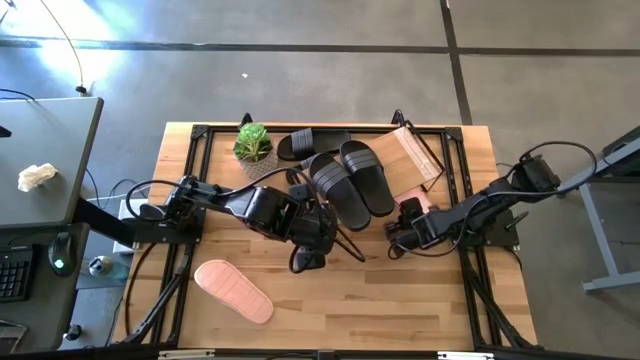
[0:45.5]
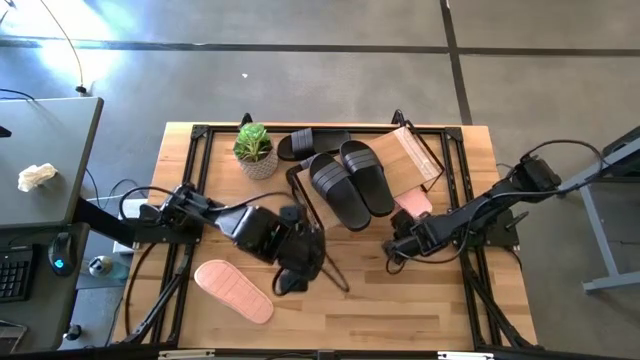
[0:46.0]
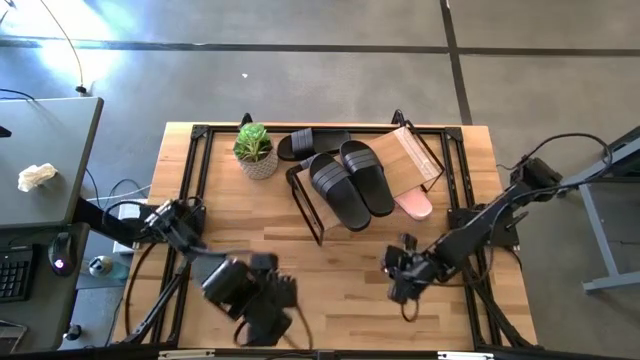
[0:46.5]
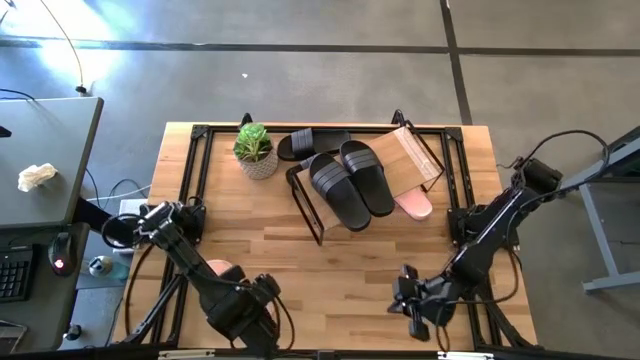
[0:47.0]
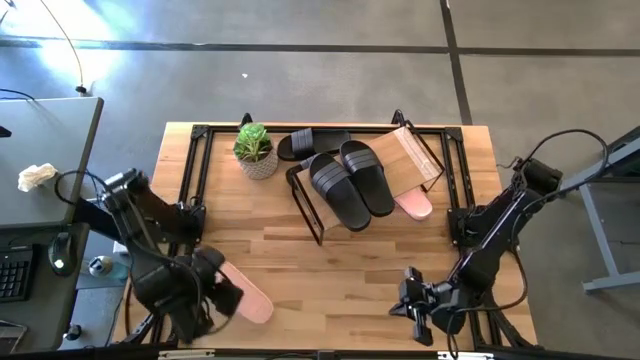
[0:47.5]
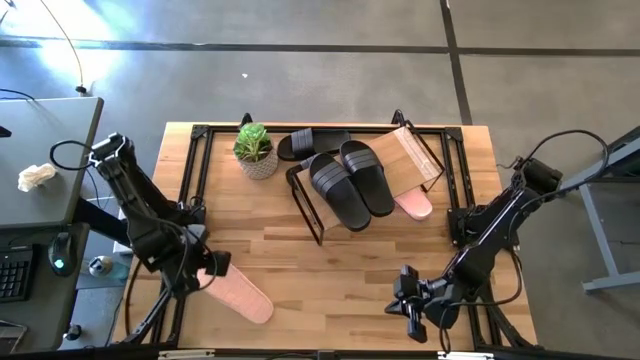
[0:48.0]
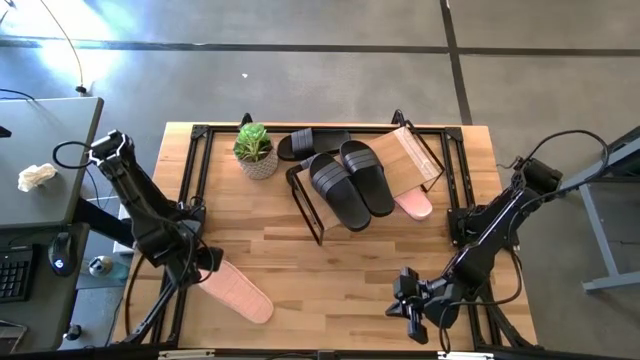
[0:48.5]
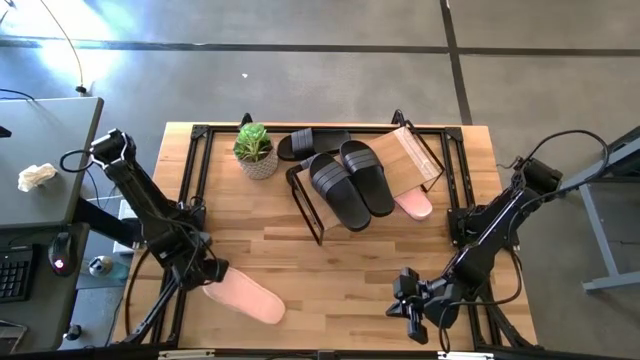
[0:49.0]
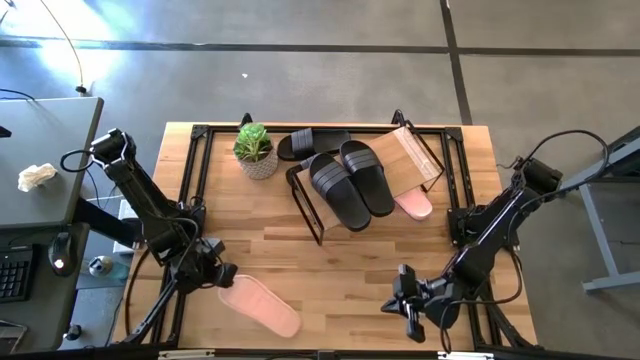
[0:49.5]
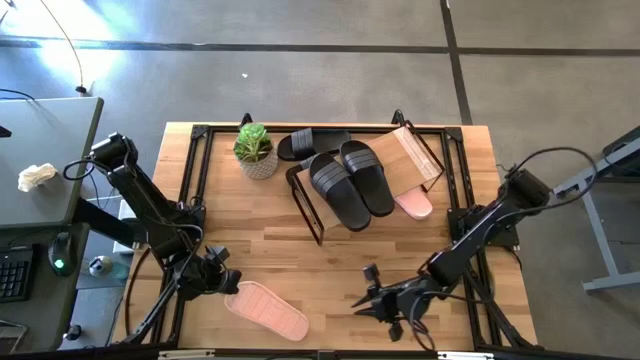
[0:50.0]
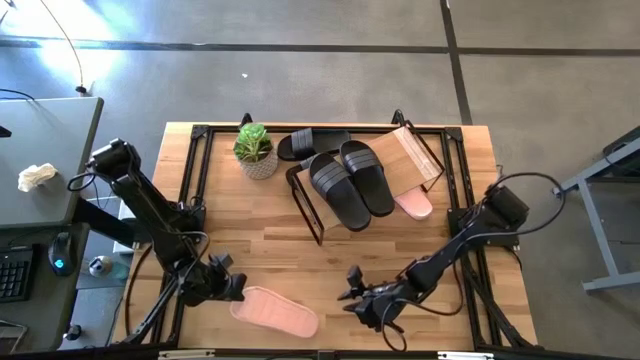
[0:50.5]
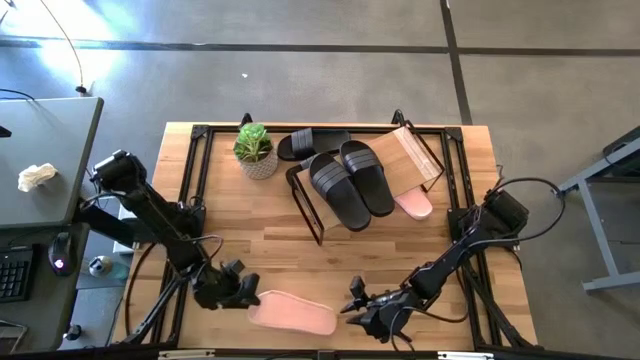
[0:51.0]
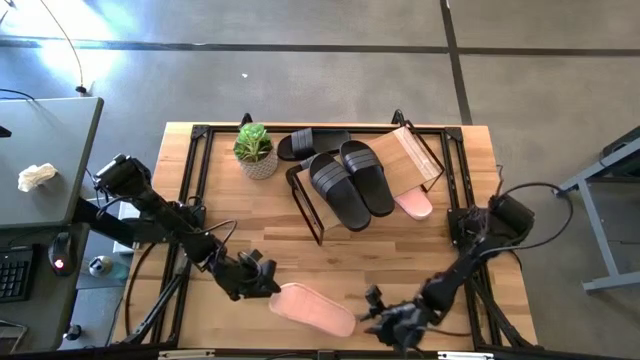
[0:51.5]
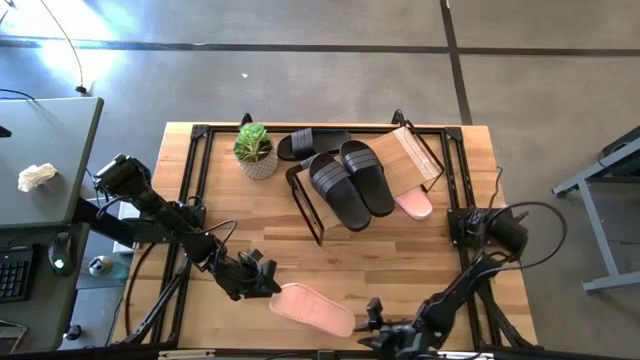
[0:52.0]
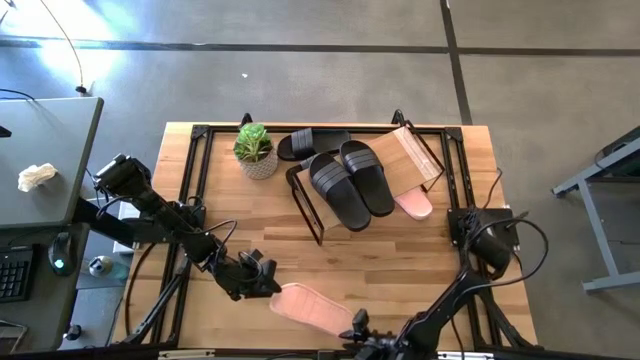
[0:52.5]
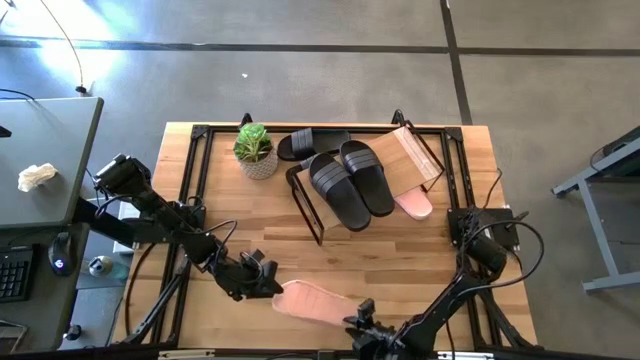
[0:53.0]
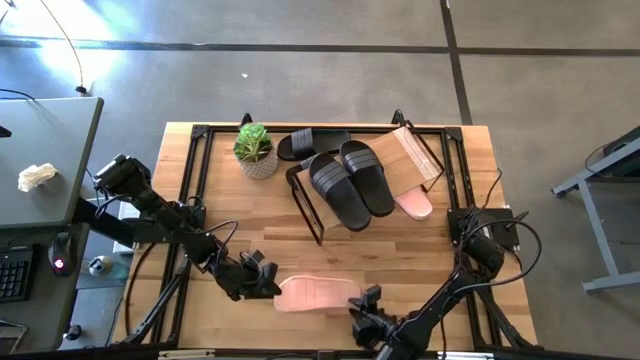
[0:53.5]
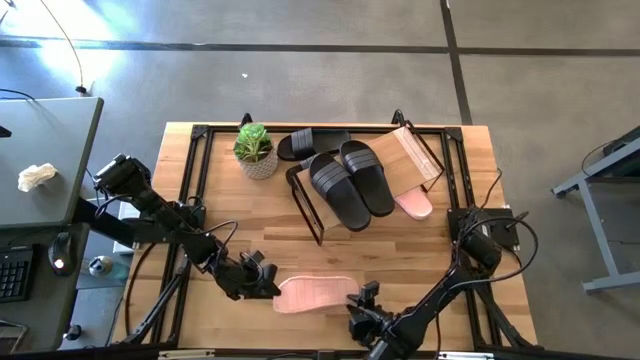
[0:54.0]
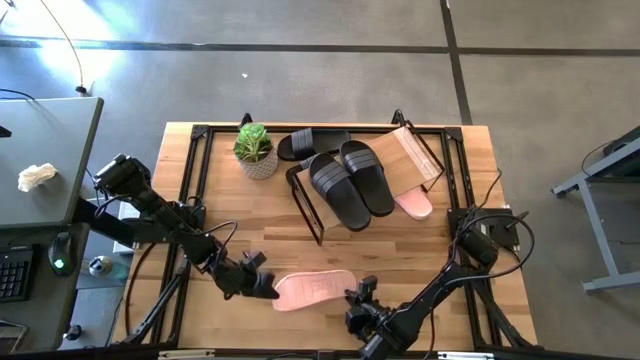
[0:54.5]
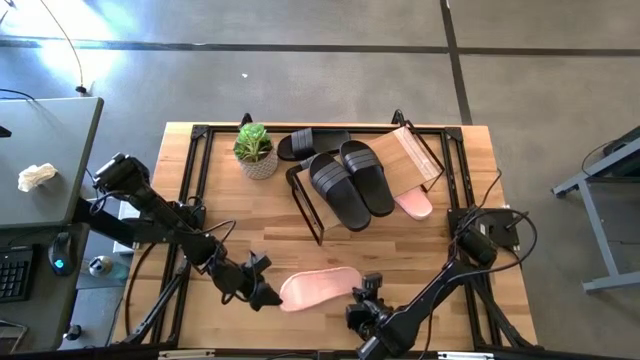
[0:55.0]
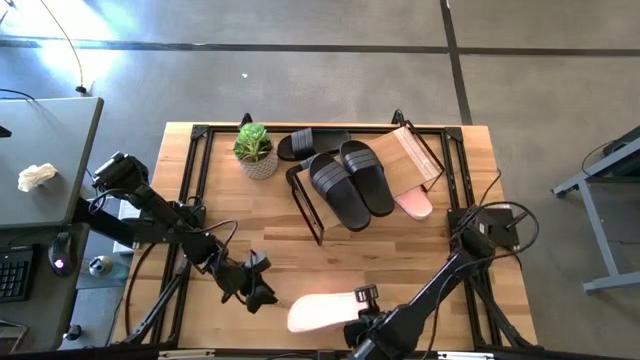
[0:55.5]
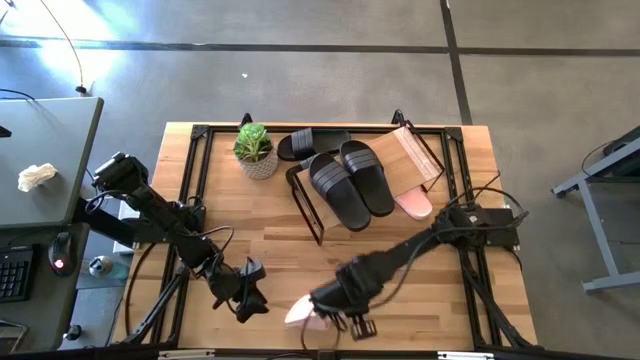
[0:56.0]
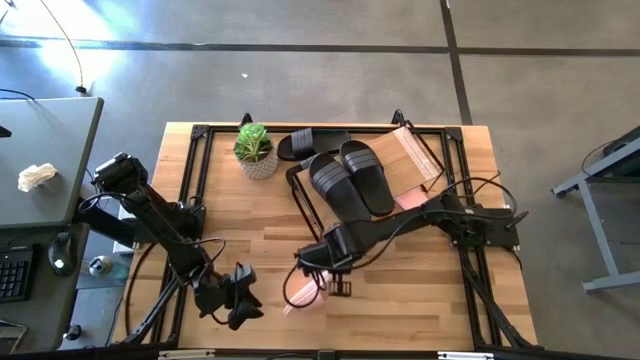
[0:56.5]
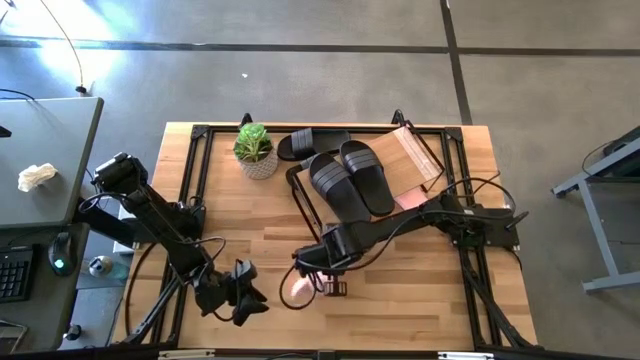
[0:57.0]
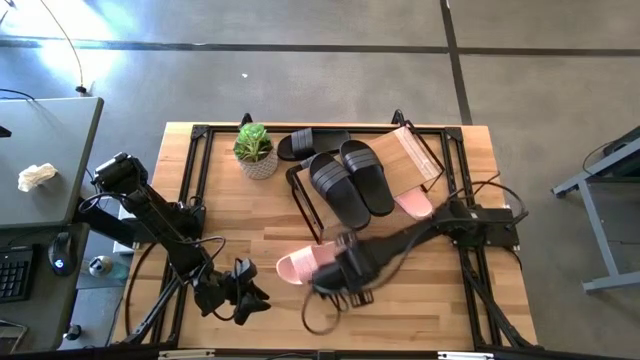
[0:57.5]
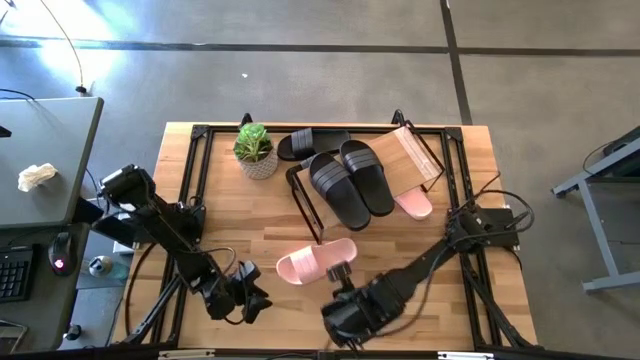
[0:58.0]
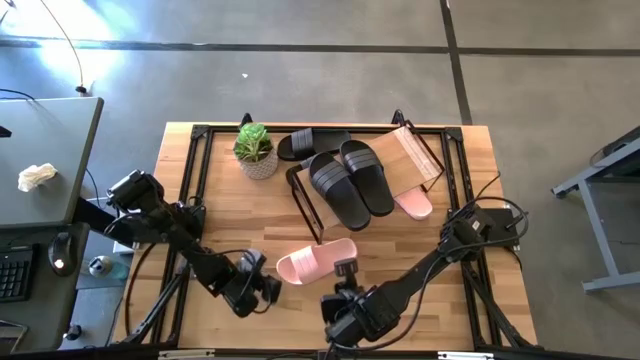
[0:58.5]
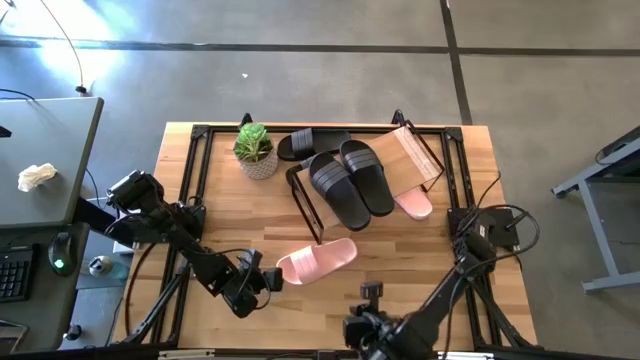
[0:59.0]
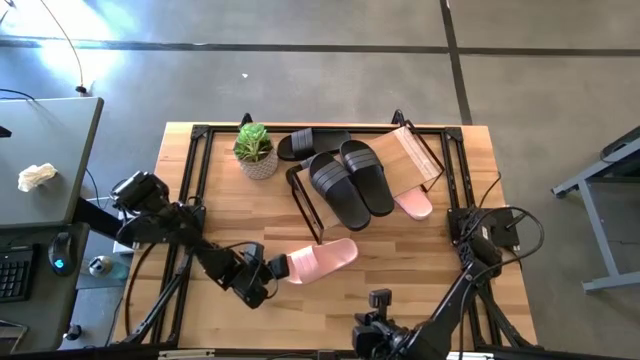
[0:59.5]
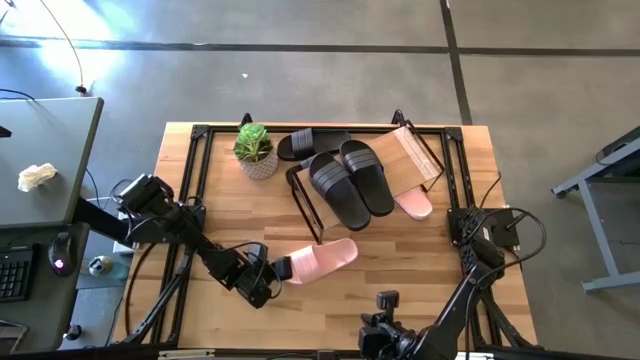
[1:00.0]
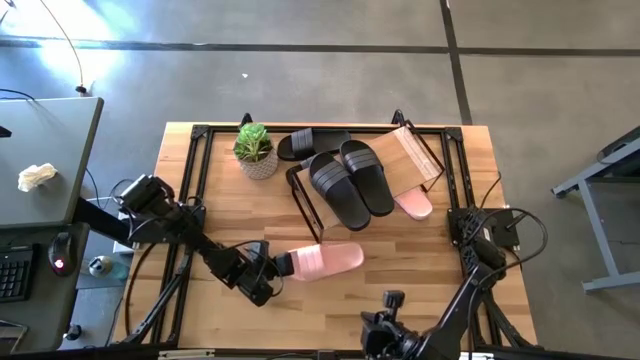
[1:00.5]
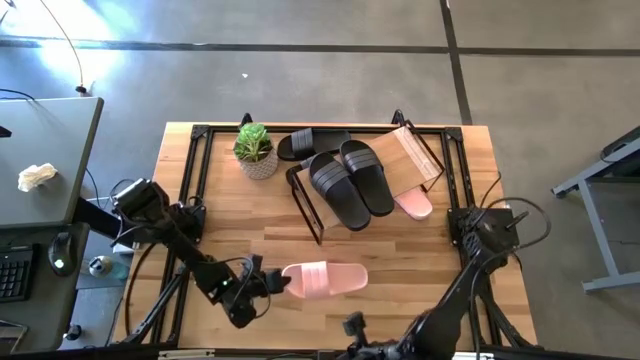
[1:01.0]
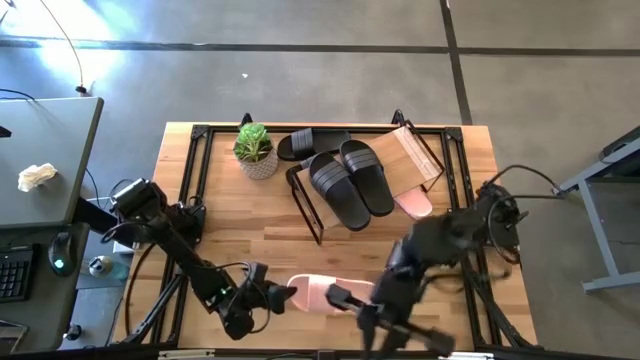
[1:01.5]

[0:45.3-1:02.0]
Task: Pick and place slides into the shelf
Put the pink slipper under the shelf

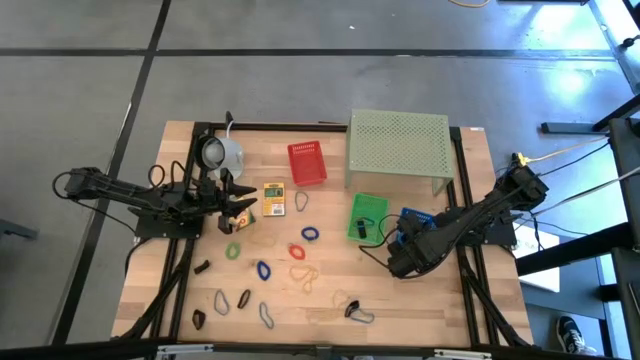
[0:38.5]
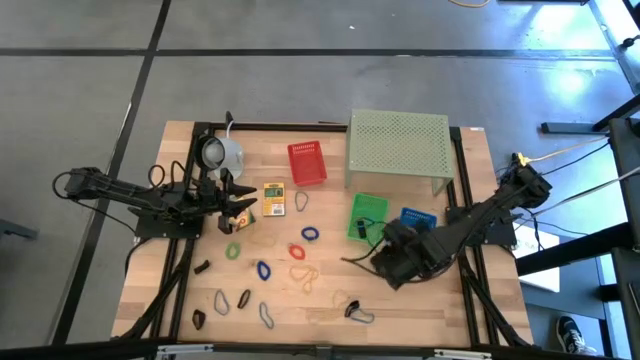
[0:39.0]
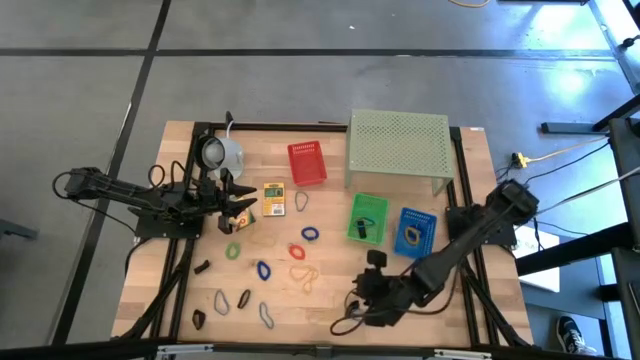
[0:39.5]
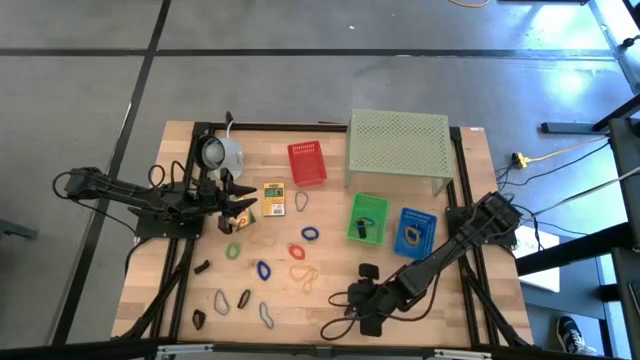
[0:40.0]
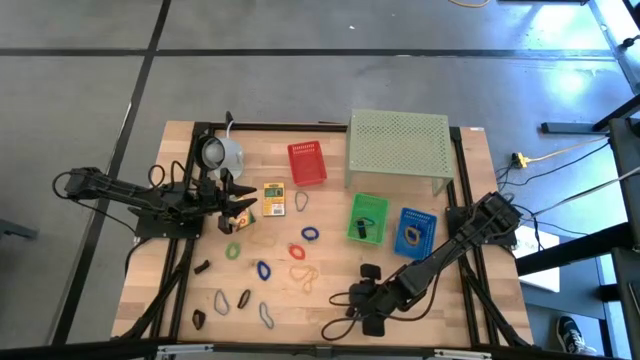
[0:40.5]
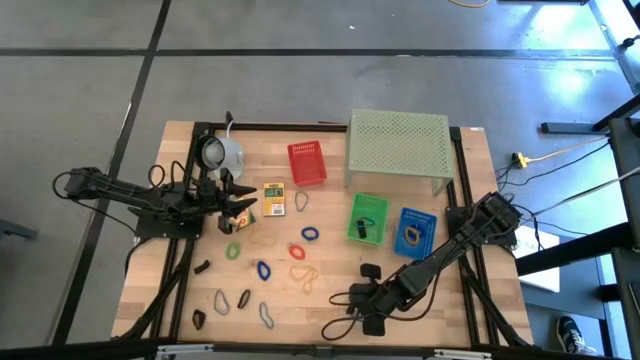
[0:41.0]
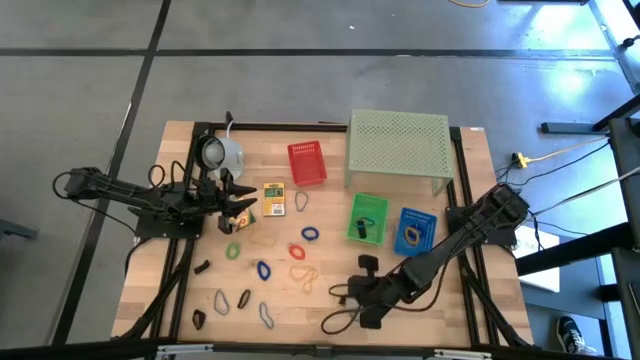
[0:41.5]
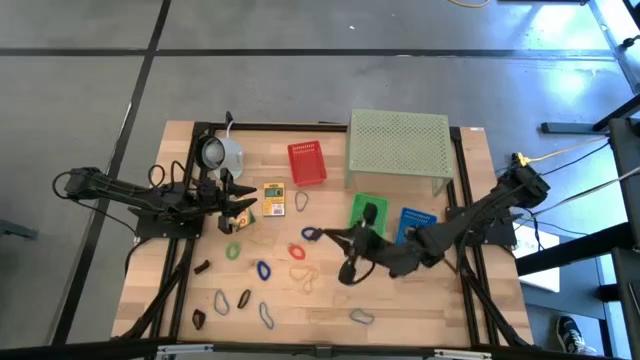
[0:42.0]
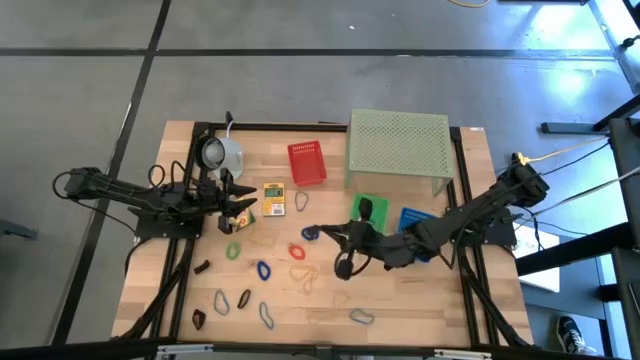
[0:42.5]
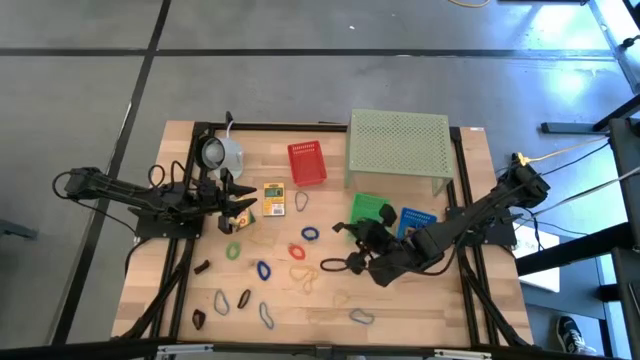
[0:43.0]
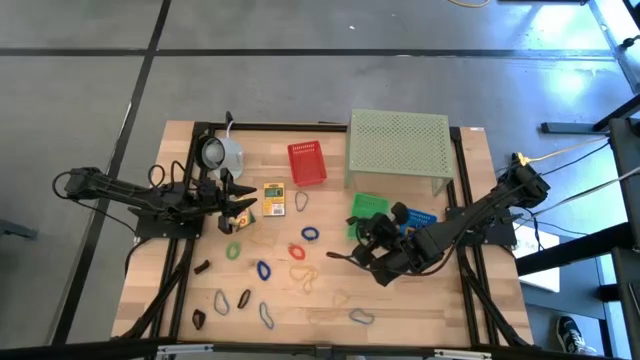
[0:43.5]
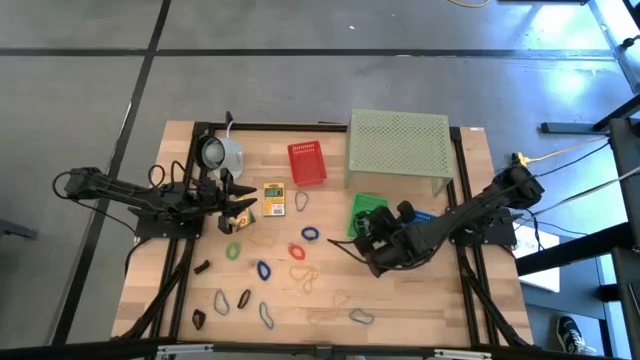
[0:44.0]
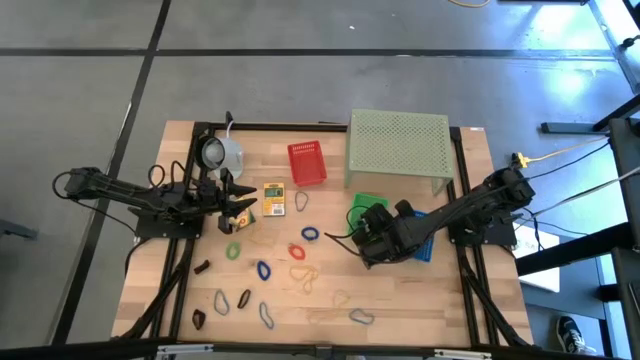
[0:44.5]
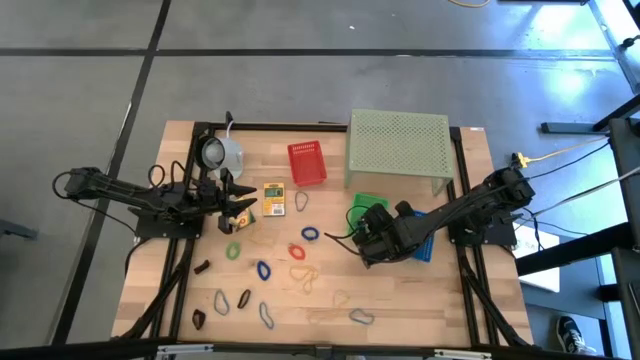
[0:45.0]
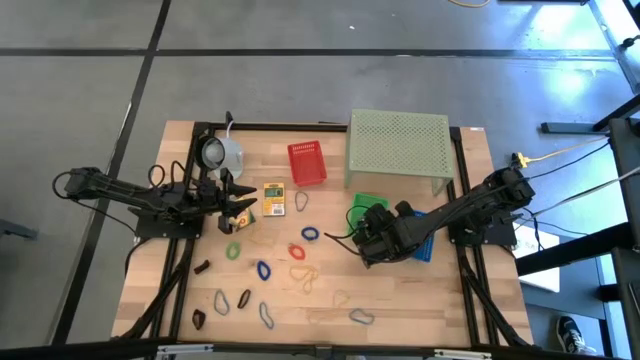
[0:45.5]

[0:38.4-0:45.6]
Task: Pick & Place Office Desk Supplies
Put the black rubber band into the green bin
